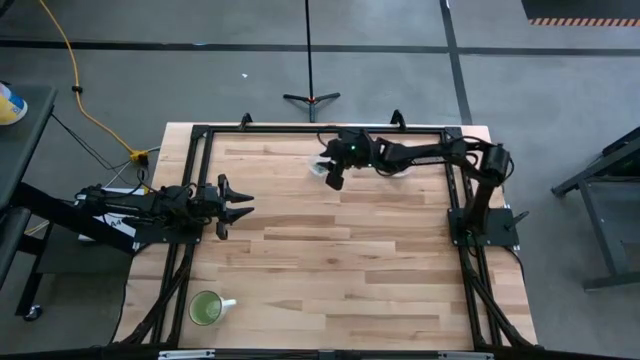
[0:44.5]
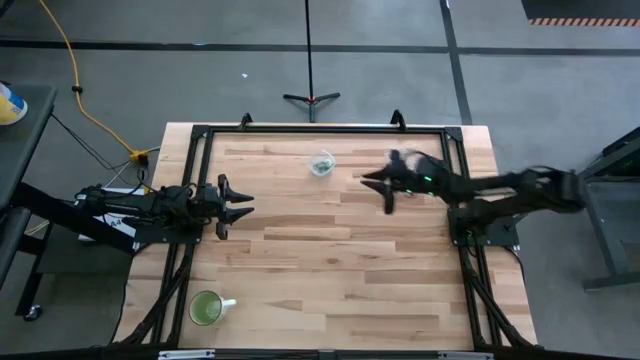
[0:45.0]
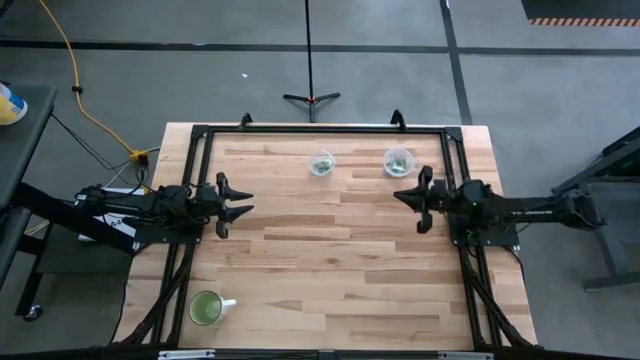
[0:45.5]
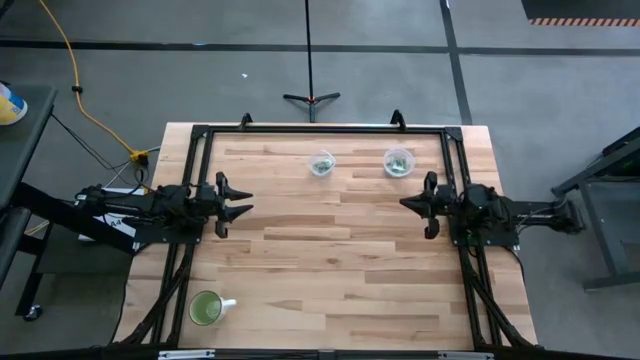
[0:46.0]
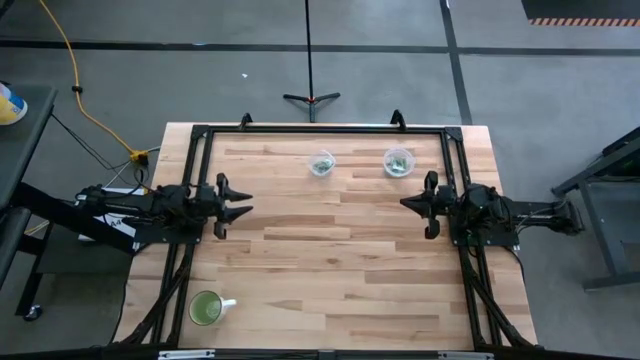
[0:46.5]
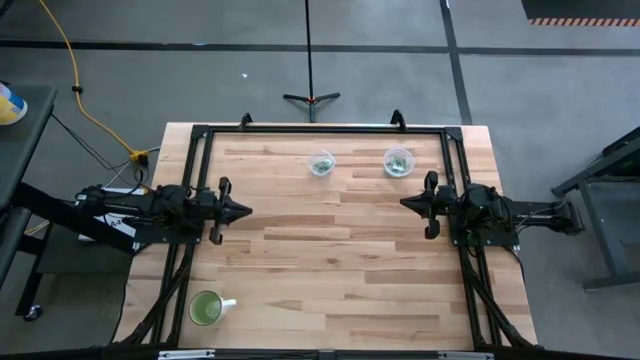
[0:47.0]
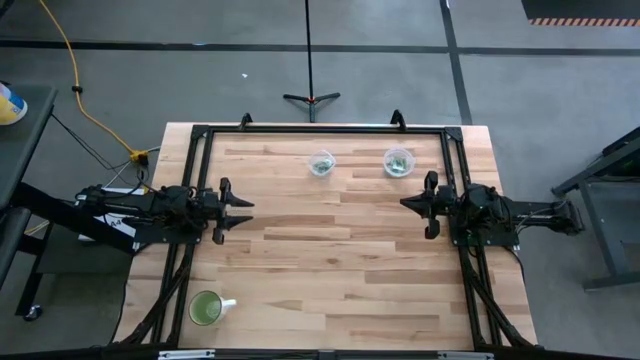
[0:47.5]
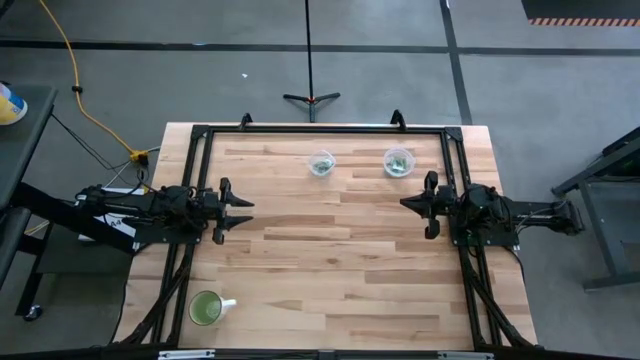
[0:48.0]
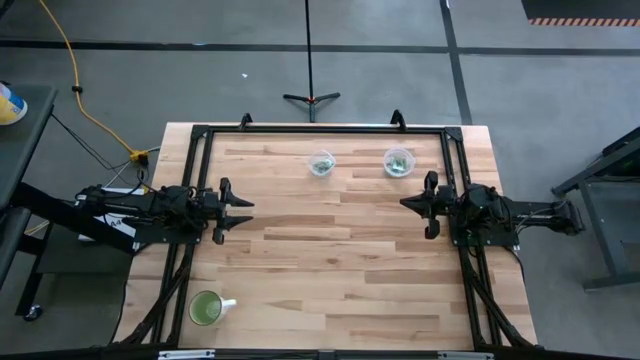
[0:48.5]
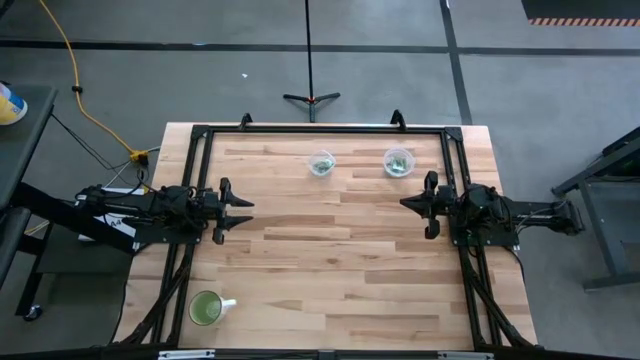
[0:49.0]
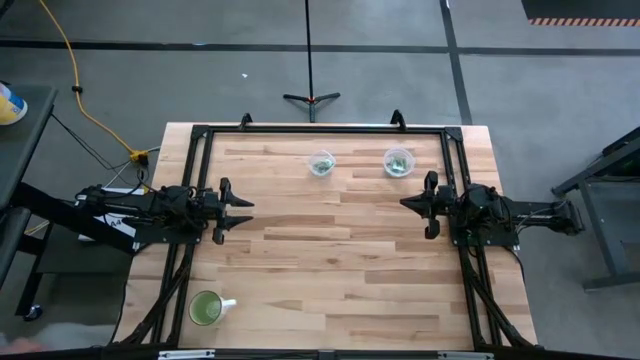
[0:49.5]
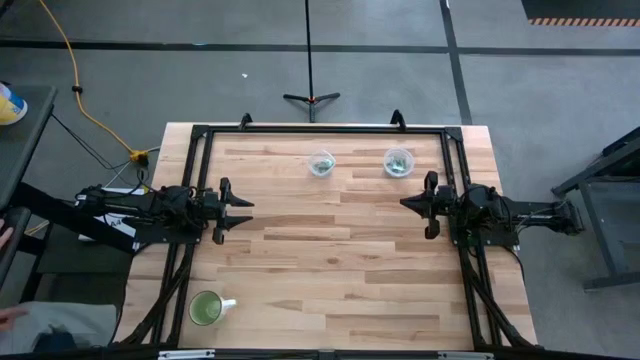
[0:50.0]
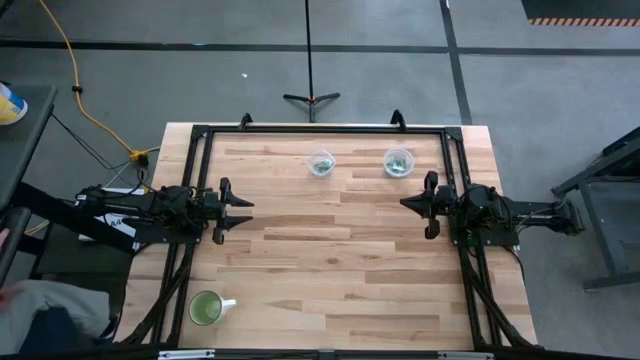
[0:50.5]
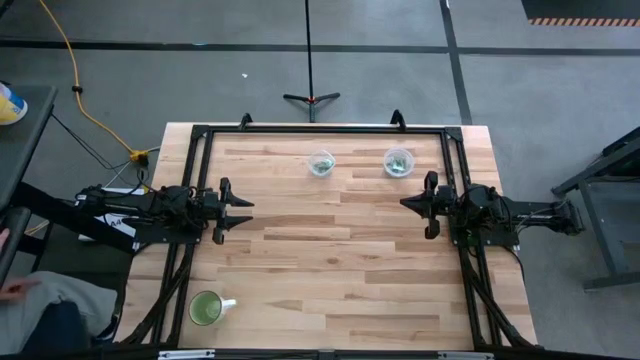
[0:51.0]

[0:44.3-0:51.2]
Task: Pick and place Stevia / Truvia into bins
Return to Home Position

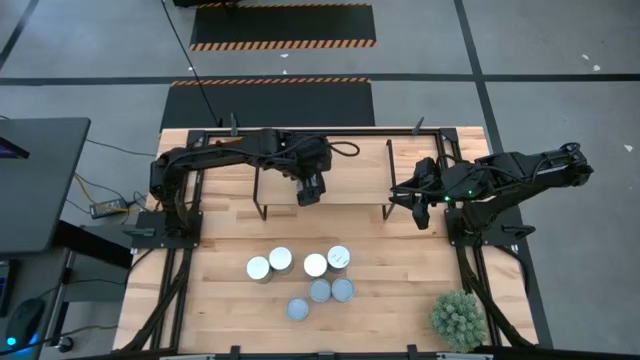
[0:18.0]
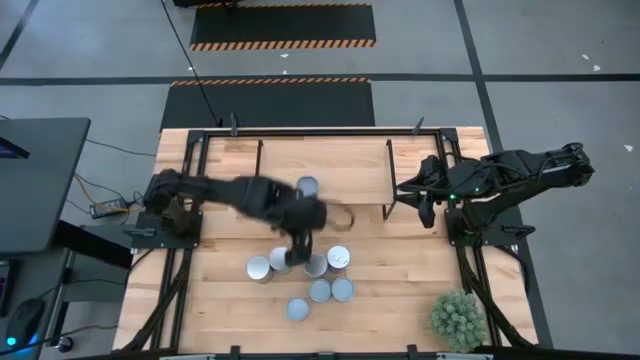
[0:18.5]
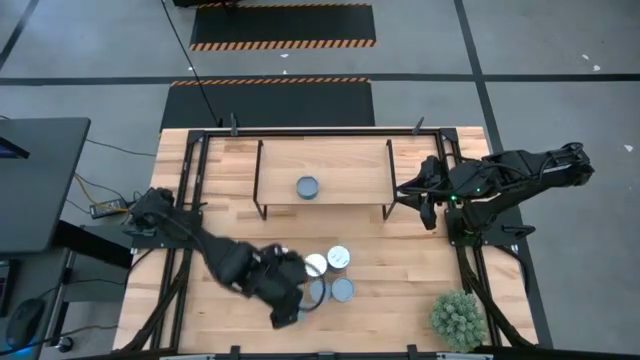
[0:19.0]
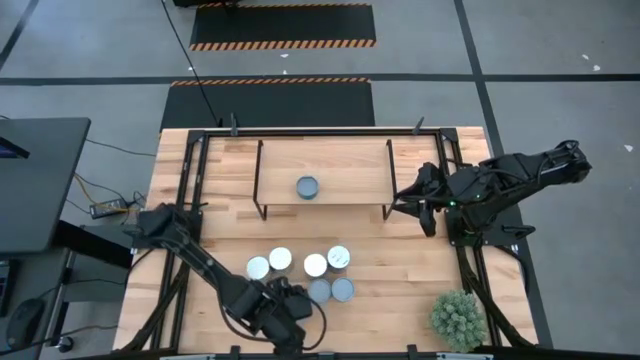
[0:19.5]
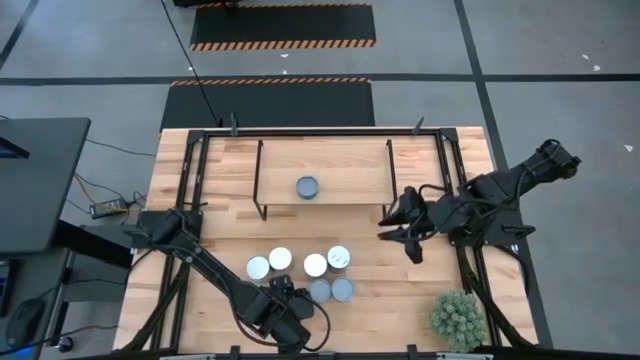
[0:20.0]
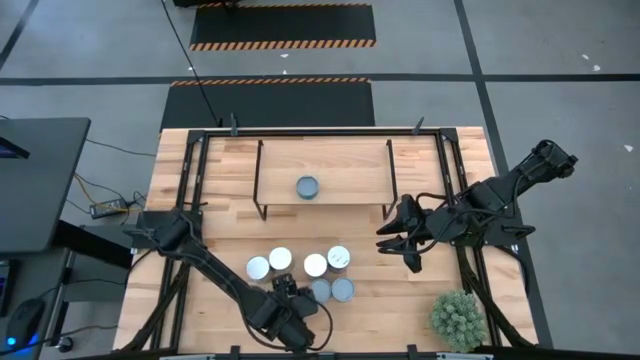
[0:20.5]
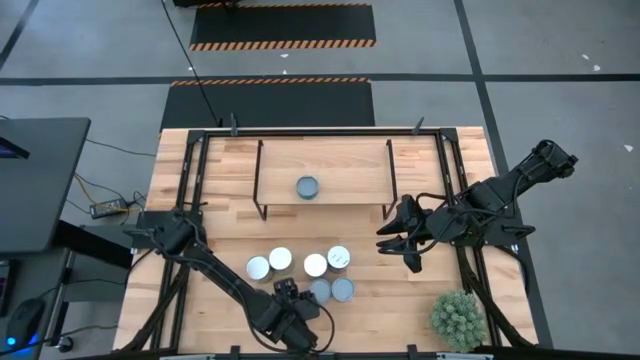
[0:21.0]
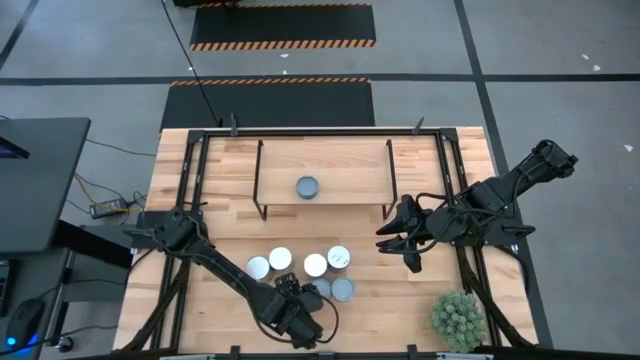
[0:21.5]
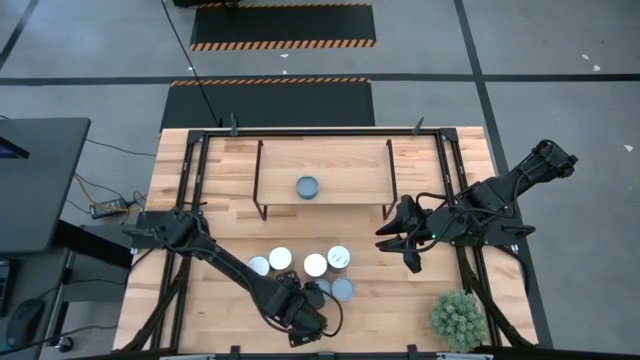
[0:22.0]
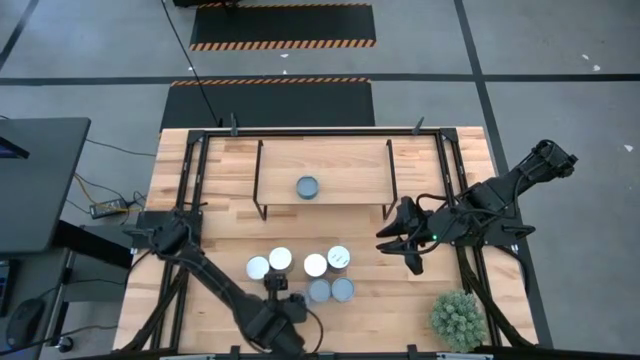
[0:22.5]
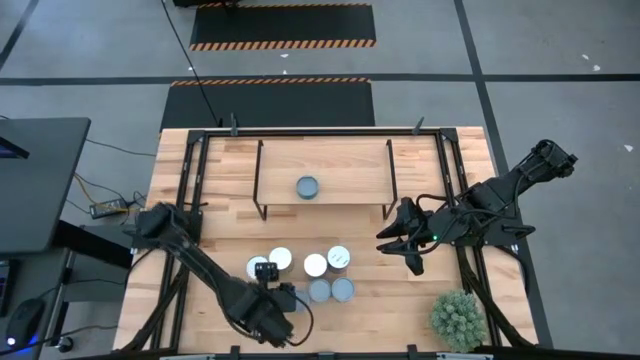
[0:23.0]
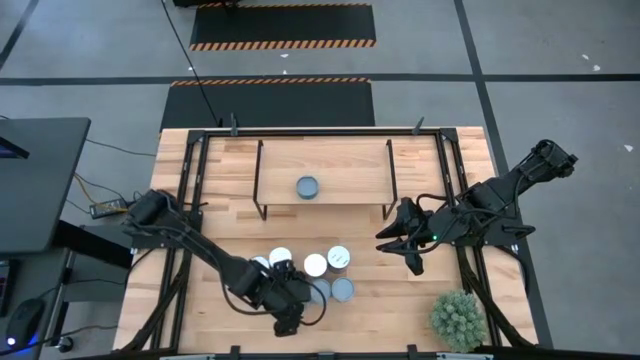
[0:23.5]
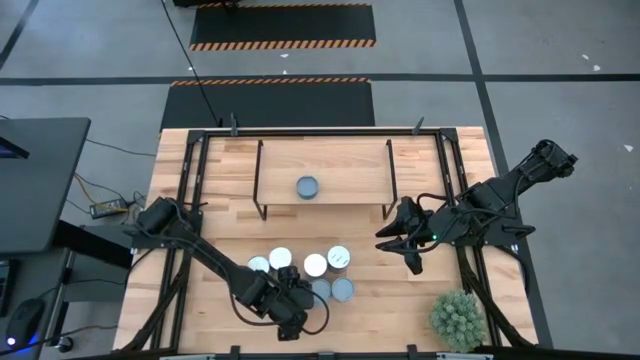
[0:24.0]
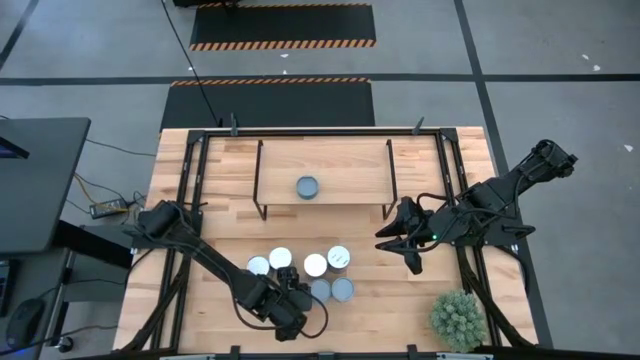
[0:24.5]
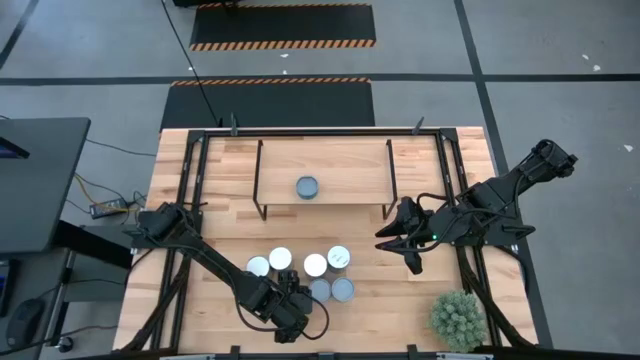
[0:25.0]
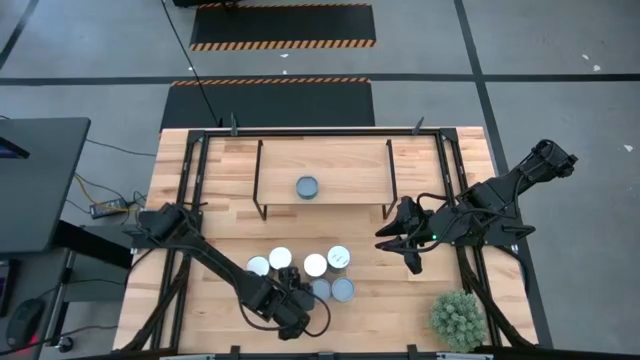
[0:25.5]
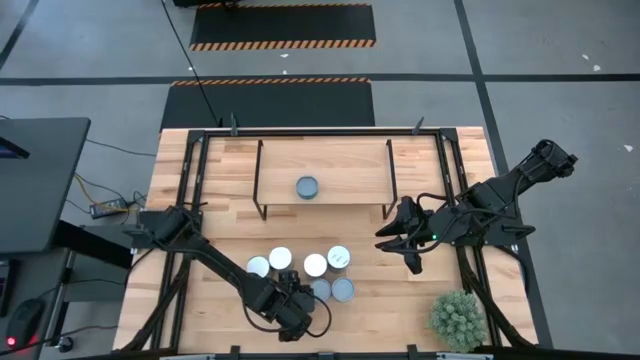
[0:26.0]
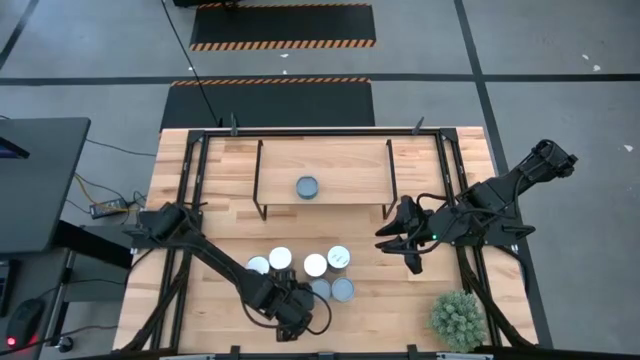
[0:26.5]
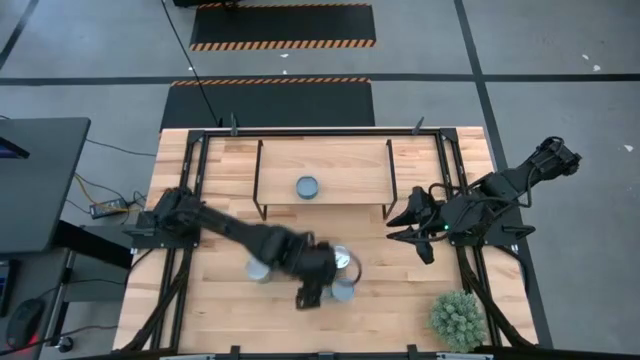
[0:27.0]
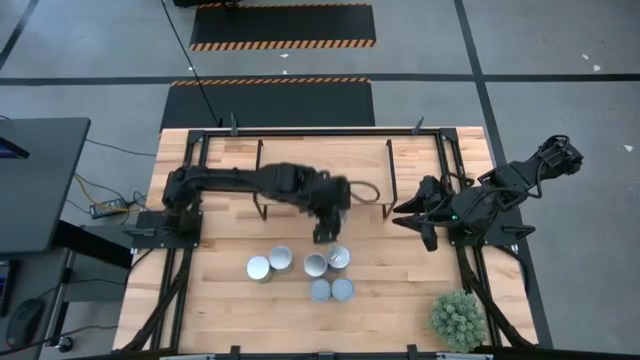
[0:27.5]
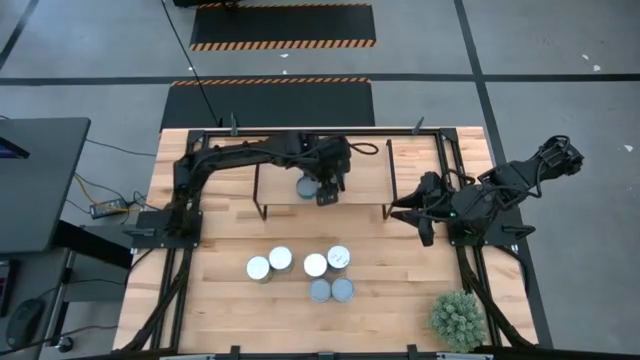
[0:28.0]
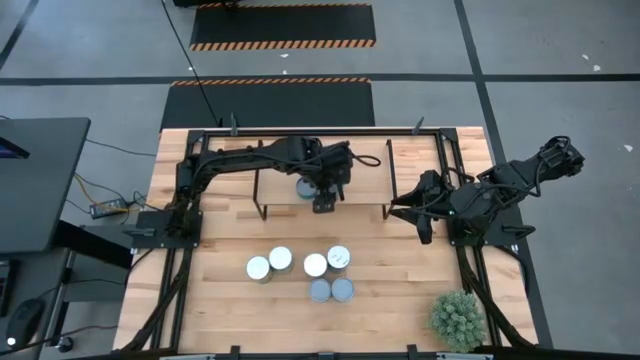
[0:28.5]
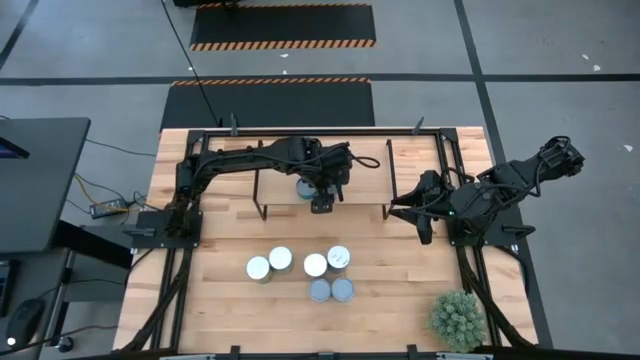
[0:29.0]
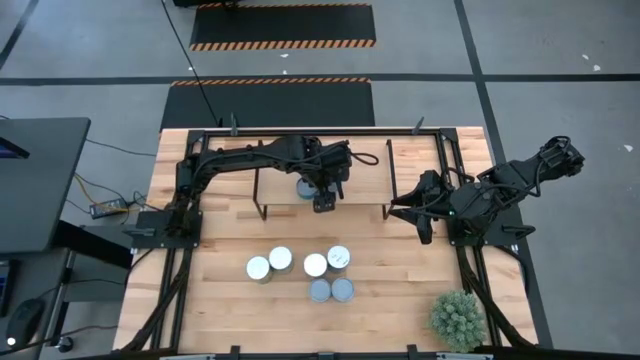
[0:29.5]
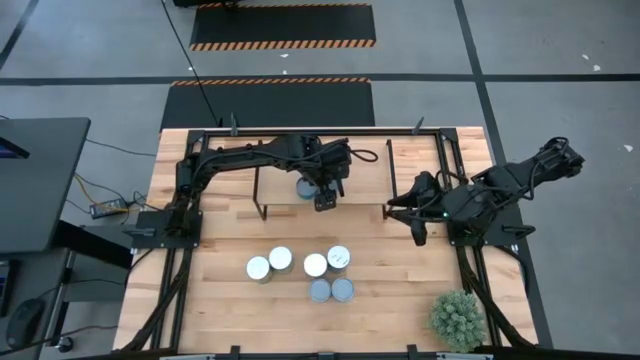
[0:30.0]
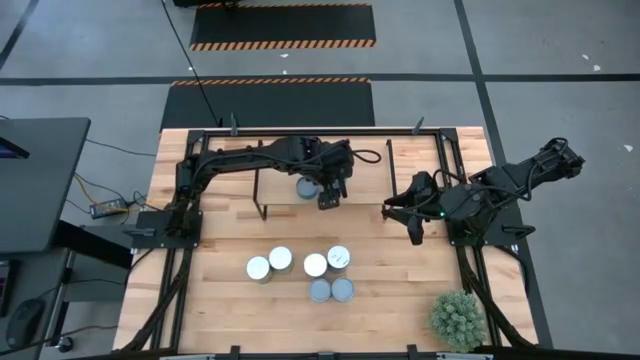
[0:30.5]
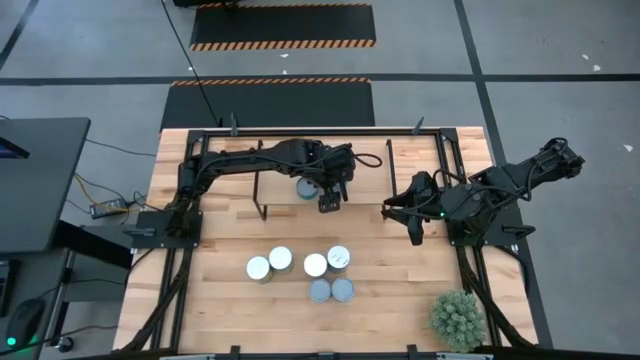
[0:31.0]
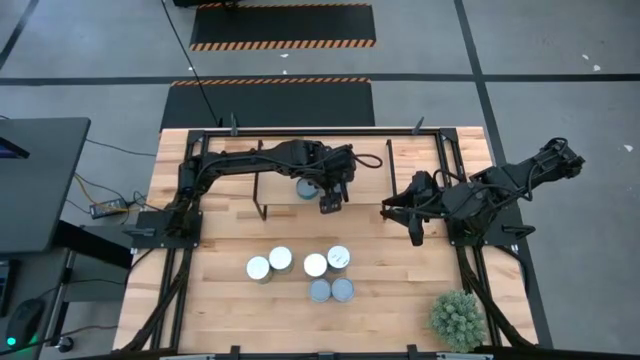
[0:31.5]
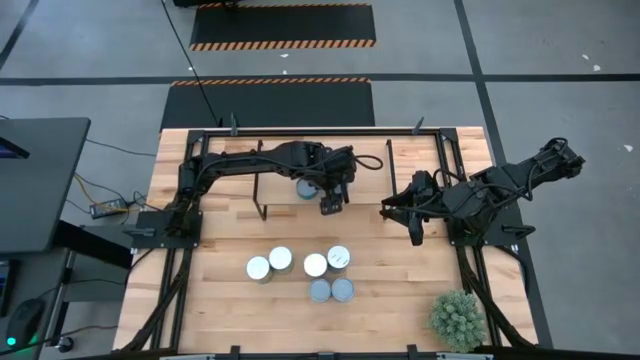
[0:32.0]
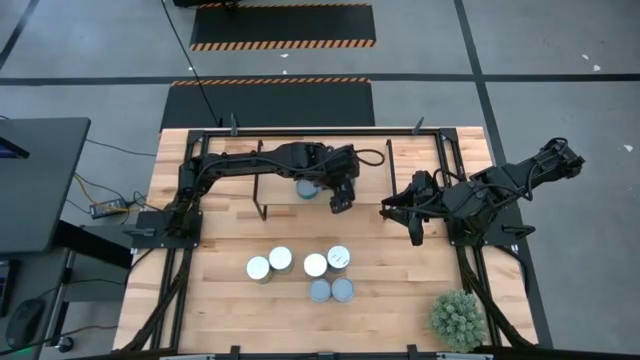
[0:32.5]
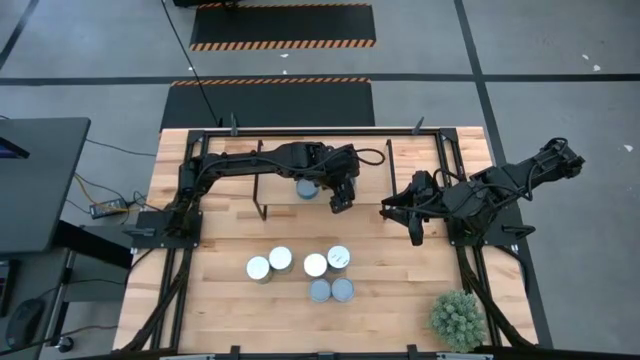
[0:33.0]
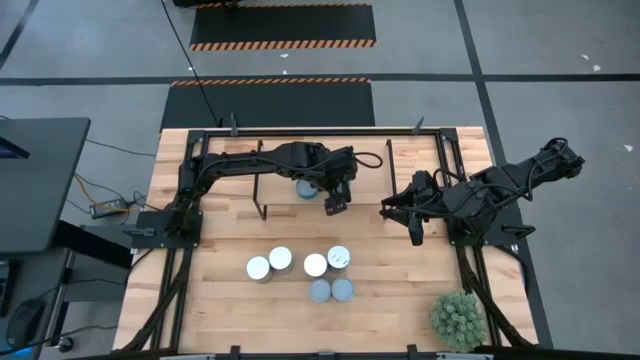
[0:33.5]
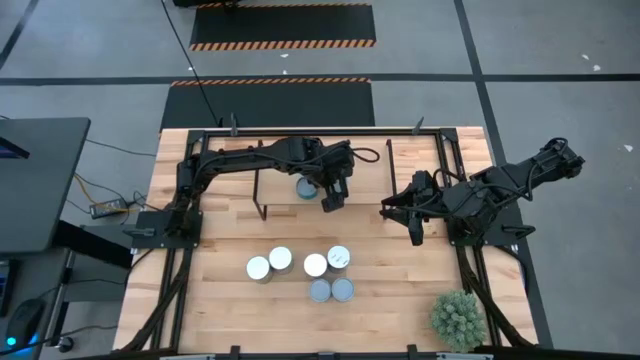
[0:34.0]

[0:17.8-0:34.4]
Task: Pick and place cans onto a shelf
Put the canned tomatoes on the shelf
